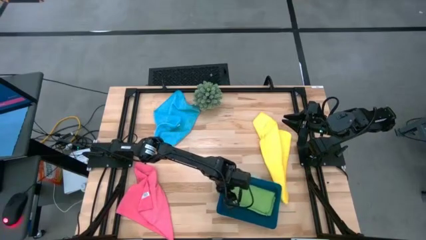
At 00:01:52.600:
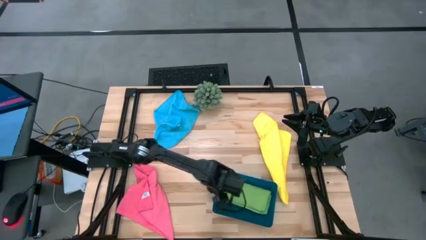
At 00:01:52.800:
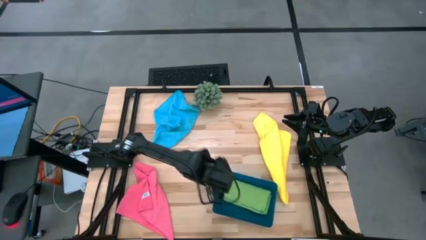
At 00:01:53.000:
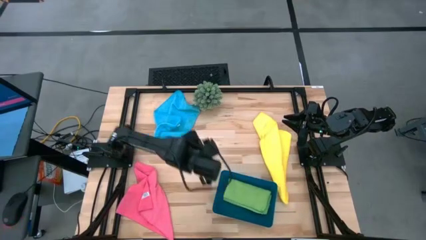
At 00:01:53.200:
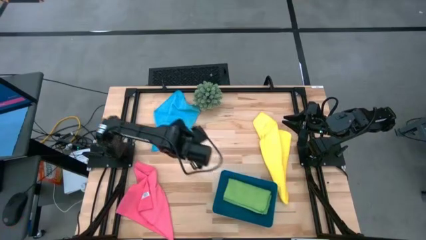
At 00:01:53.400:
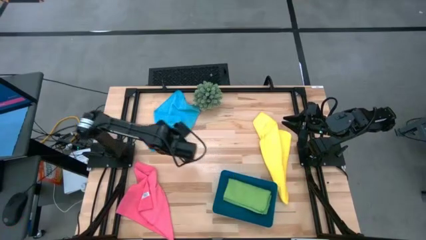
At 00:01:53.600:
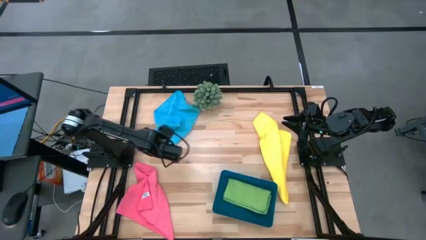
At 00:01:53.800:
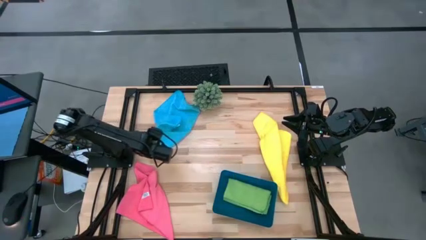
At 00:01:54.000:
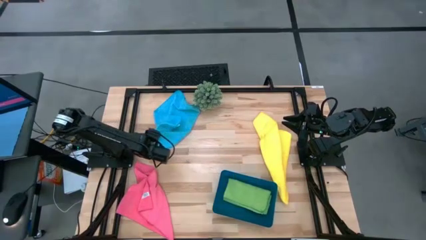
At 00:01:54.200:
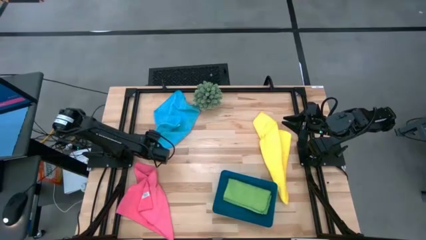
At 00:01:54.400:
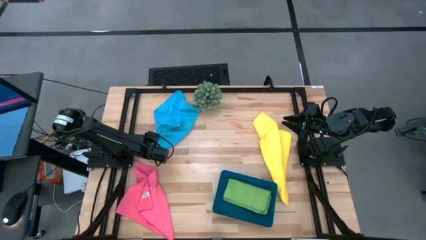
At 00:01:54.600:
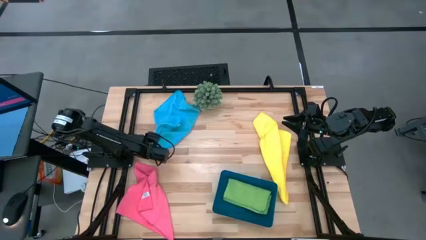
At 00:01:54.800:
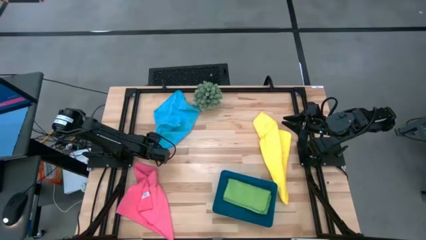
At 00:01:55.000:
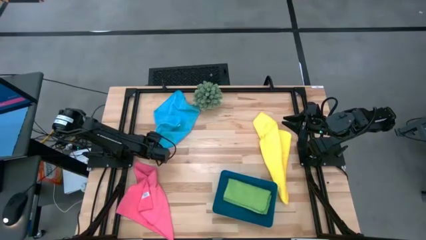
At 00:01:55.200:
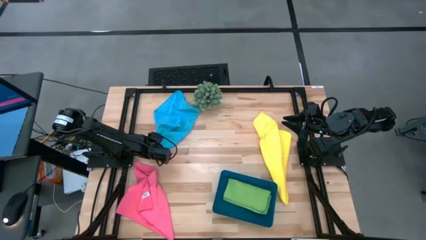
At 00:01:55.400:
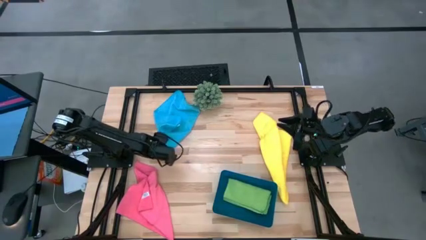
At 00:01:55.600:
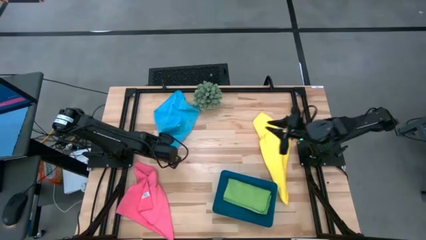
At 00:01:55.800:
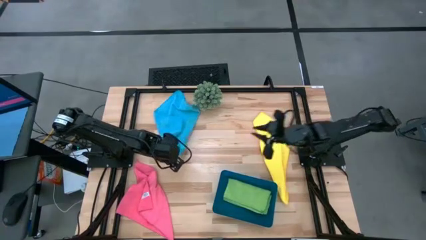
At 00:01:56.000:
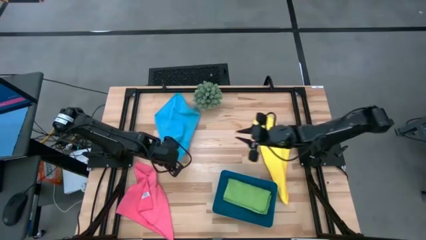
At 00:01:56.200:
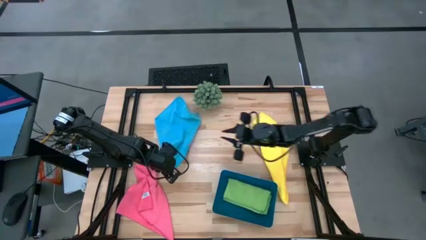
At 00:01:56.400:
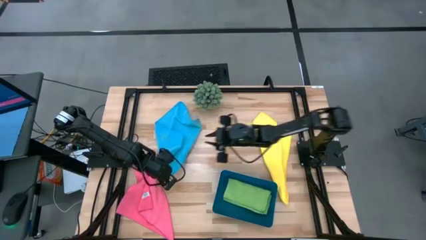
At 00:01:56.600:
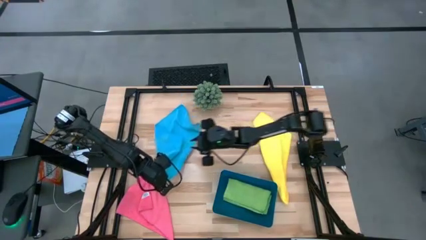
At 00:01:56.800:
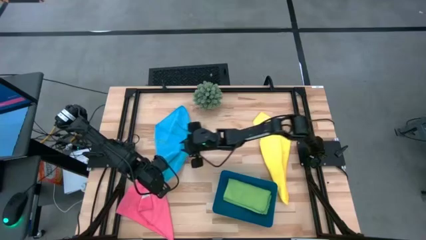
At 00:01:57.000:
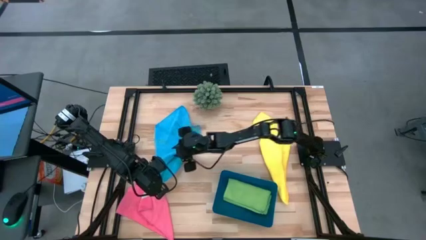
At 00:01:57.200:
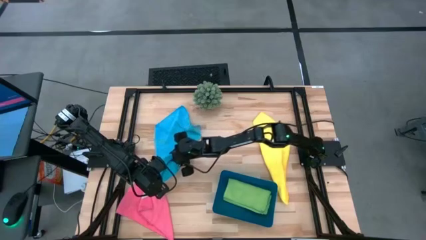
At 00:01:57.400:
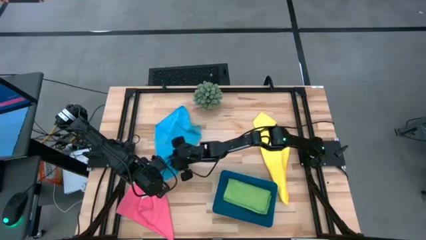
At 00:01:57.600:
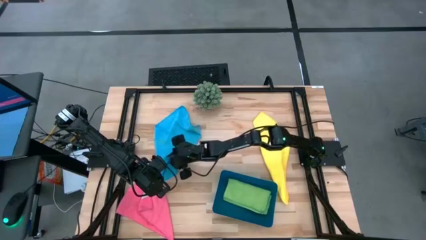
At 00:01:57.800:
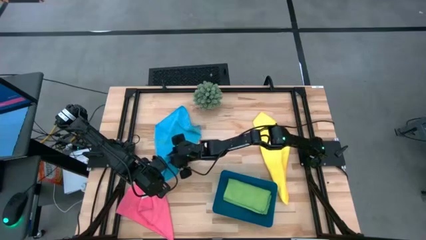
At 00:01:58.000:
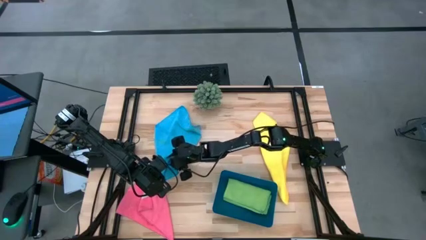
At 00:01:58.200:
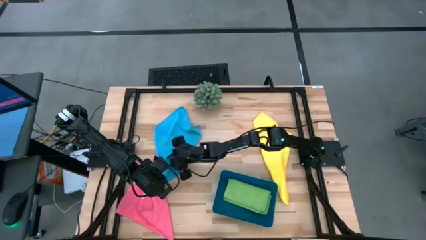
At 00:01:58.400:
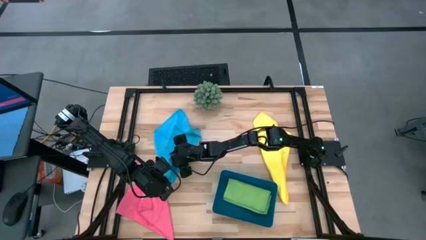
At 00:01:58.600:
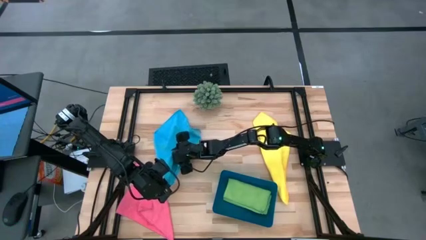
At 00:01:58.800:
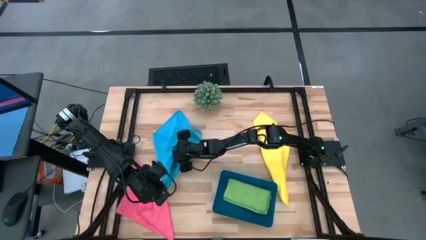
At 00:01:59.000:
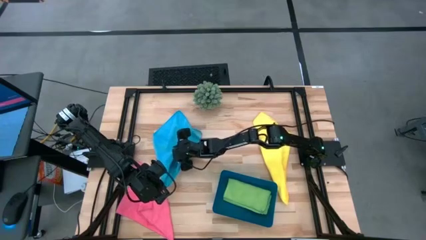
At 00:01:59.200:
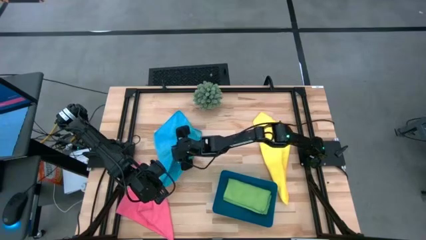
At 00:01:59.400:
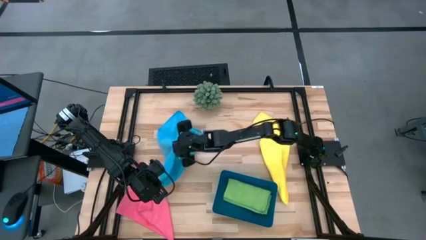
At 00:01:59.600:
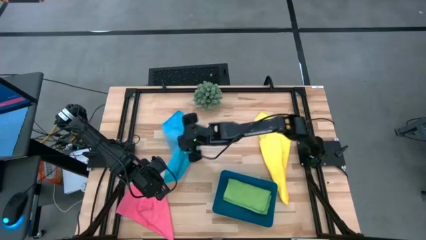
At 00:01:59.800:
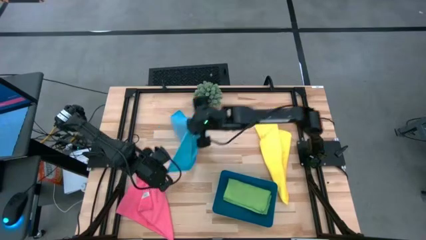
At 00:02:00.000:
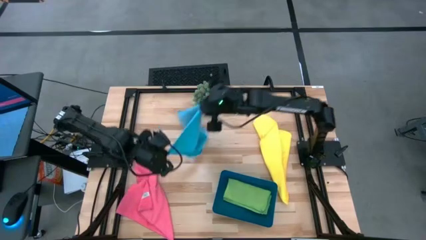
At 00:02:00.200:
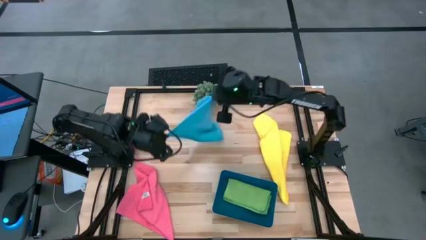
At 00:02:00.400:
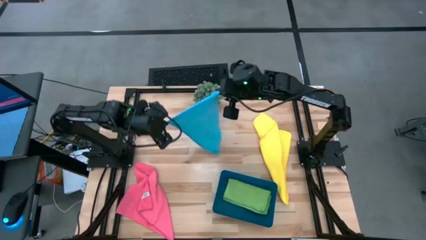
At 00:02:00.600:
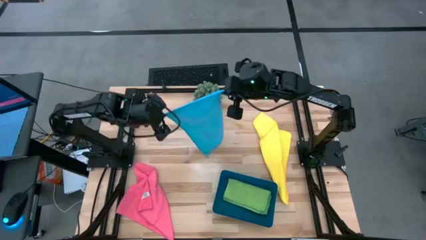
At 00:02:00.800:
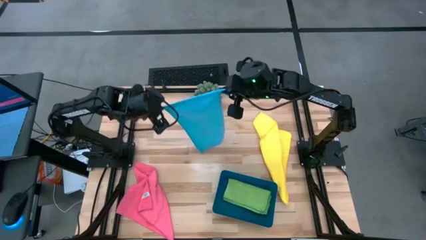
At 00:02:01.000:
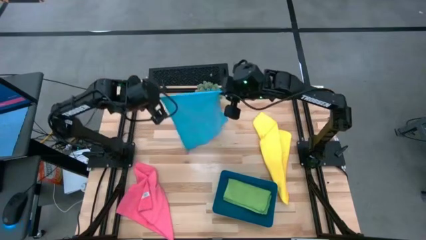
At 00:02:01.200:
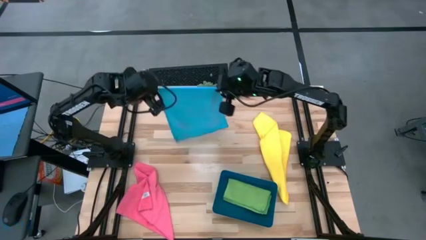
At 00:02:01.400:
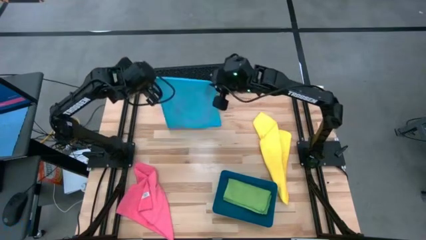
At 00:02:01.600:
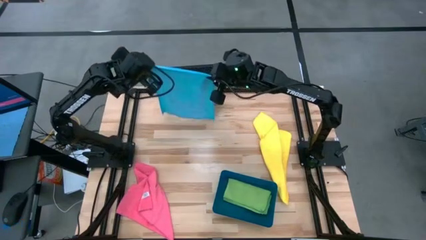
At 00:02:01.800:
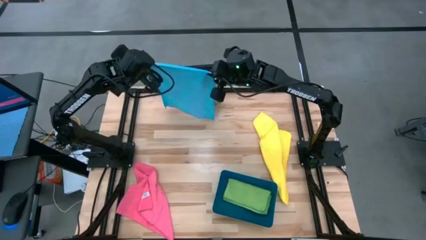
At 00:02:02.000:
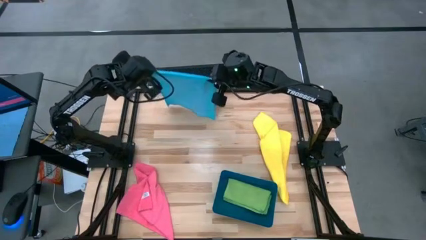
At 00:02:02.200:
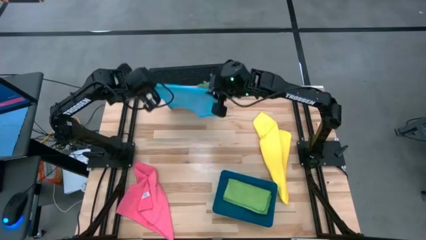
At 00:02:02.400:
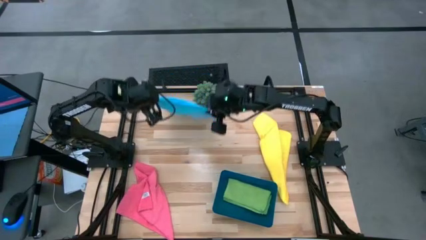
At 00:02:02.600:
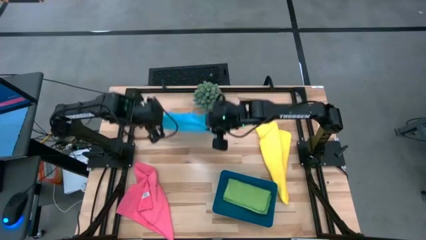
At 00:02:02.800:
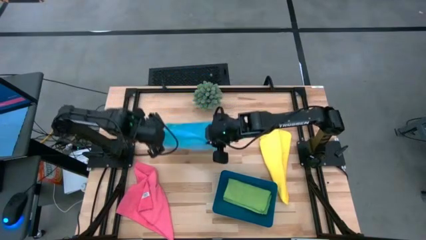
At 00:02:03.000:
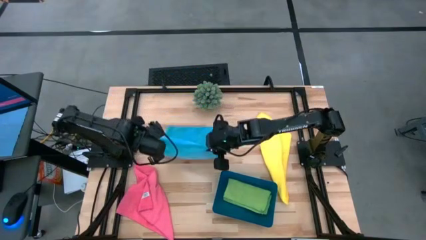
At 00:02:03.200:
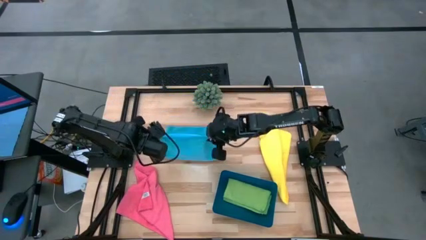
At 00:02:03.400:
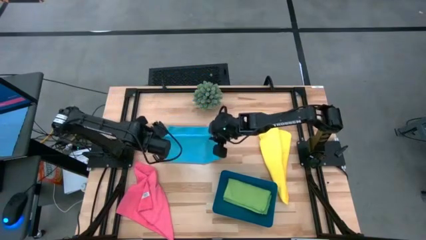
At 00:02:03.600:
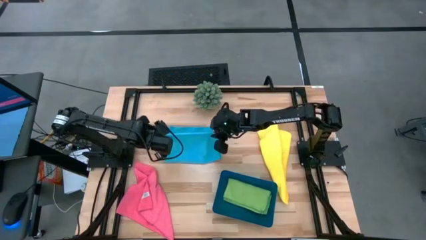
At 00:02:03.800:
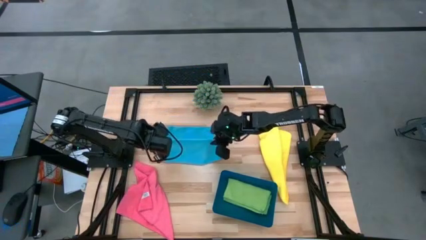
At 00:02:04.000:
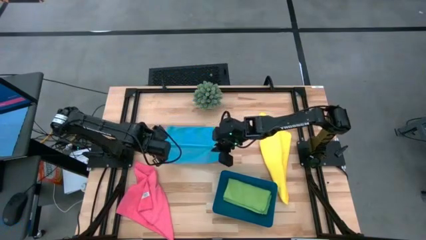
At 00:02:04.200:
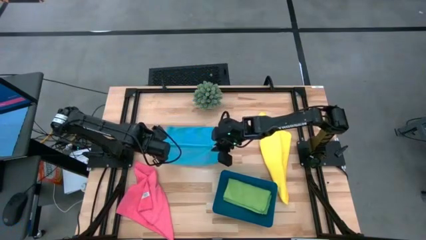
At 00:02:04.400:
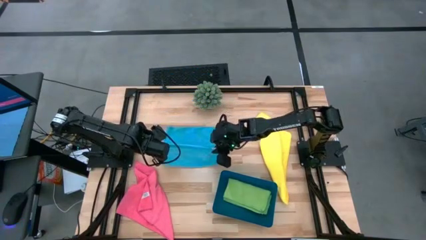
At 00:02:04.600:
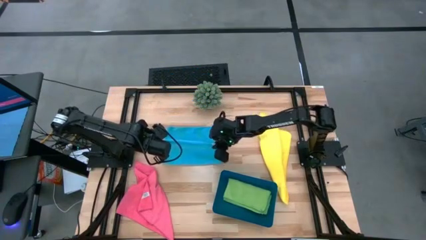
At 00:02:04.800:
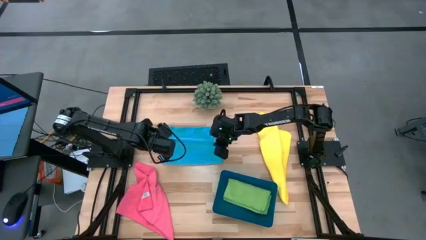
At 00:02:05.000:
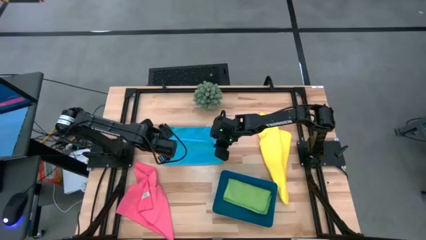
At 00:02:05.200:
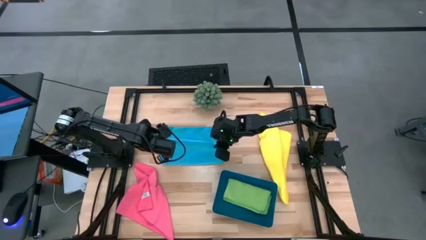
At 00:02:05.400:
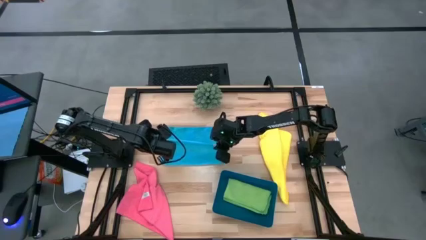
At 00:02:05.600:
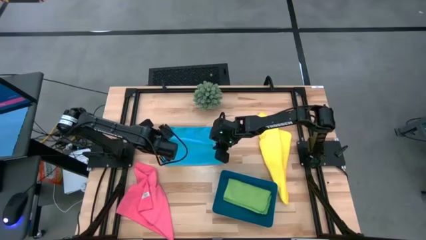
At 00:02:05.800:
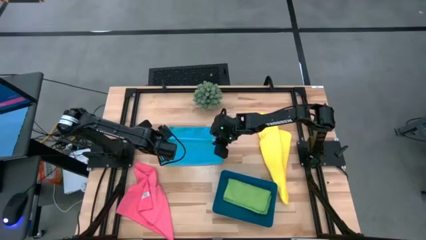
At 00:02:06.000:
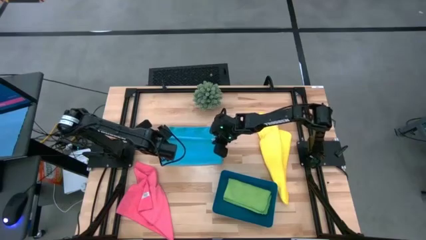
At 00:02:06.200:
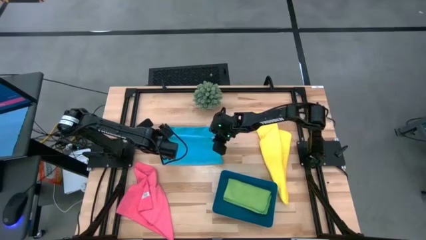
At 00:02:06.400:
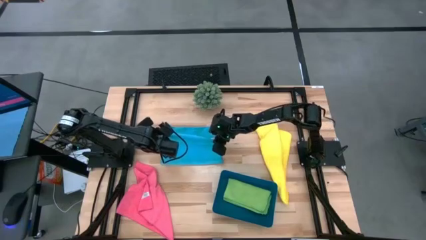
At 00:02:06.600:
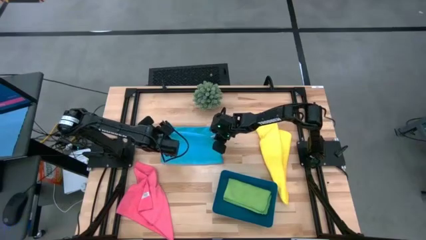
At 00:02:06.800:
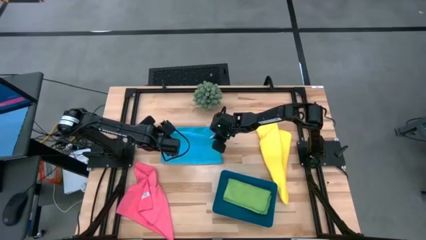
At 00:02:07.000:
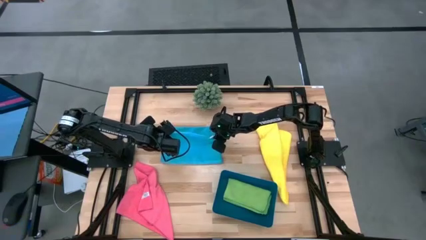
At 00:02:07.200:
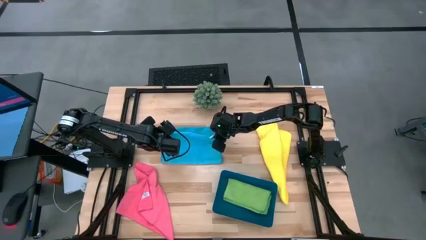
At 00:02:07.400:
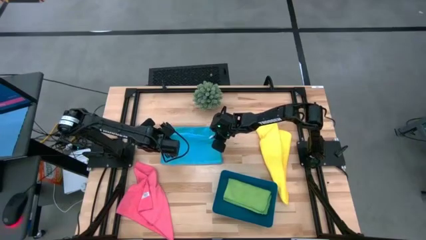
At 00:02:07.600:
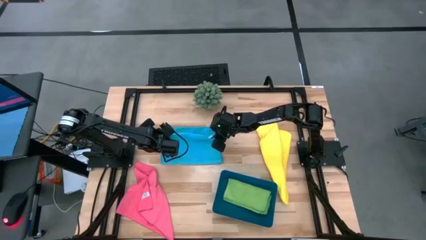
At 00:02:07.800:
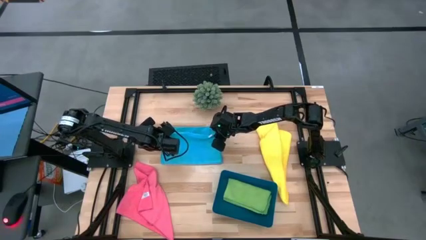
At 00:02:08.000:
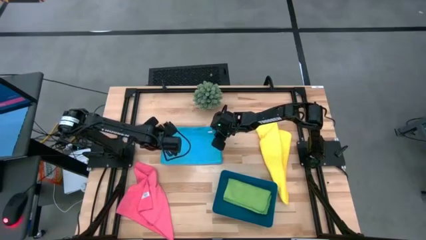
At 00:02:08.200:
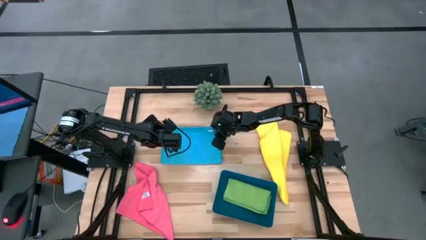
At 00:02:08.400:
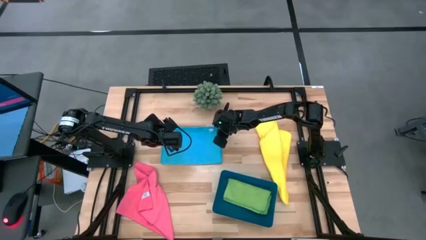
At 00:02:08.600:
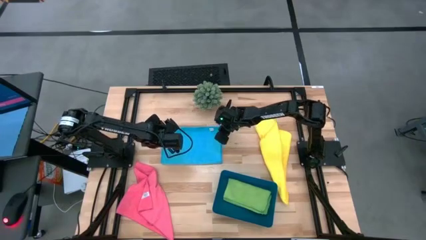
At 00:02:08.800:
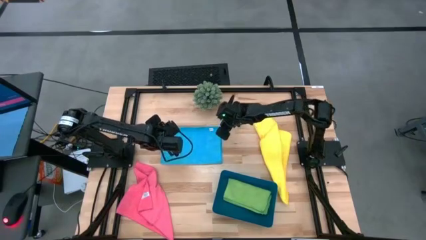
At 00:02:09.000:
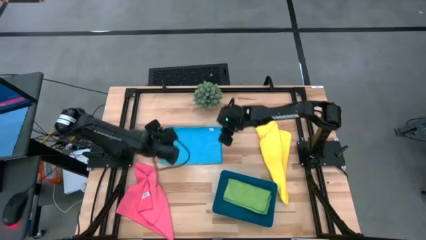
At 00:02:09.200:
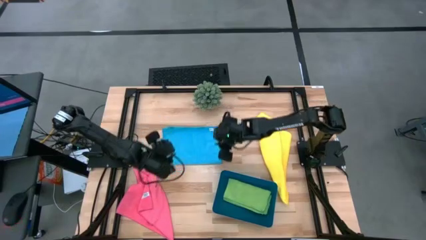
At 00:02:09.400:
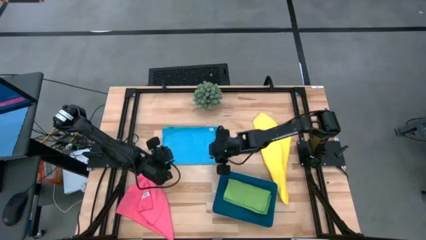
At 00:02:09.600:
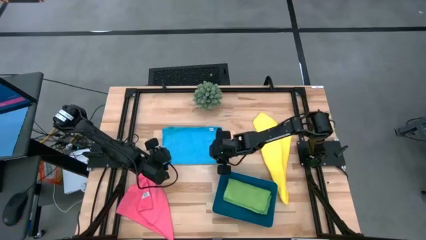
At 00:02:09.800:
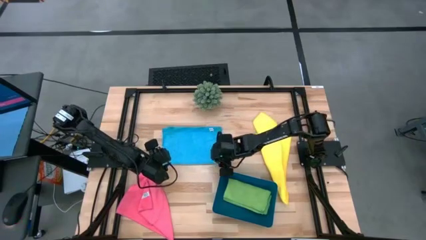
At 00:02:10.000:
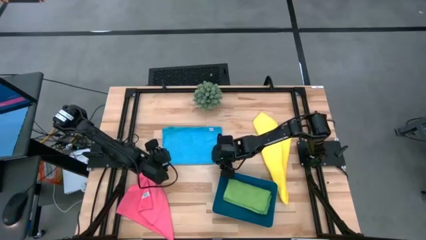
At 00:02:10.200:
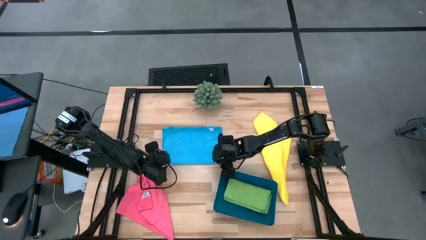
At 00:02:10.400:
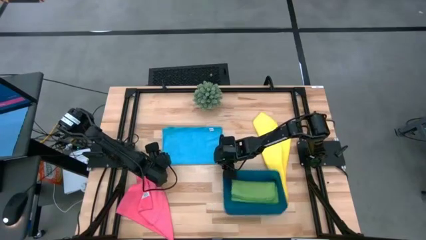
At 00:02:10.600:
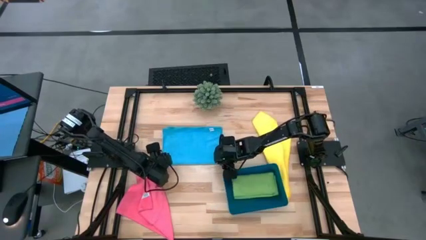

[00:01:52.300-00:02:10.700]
Task: Fold microfiber towels
Fold the blue microfiber cloth
